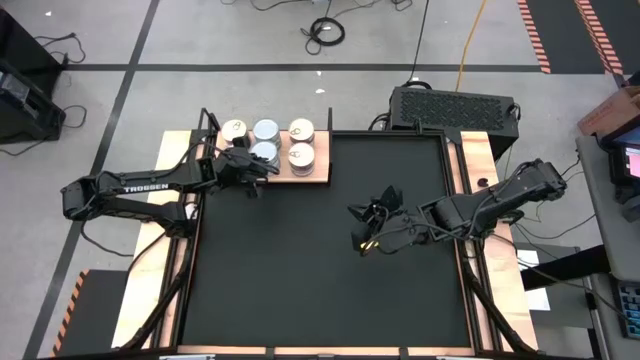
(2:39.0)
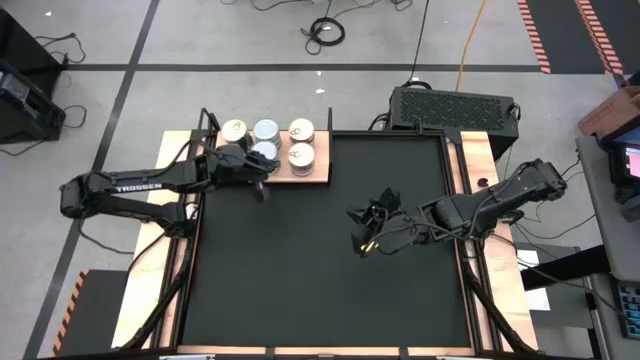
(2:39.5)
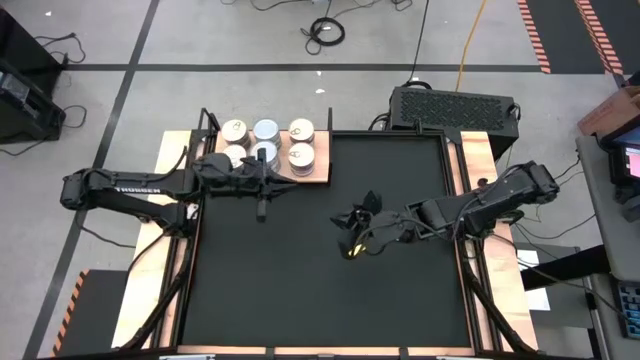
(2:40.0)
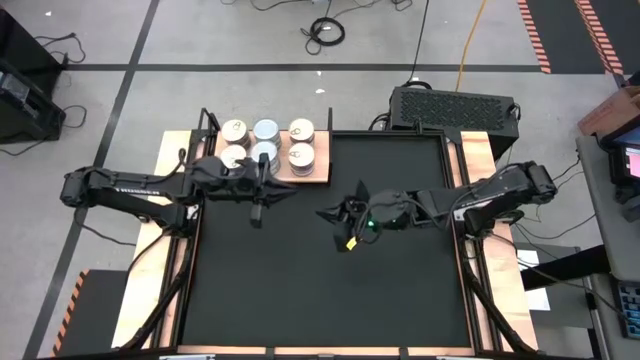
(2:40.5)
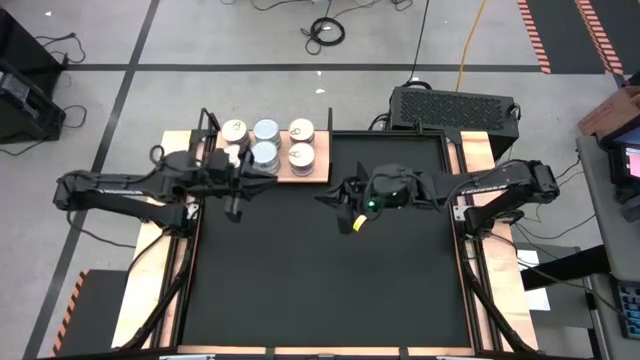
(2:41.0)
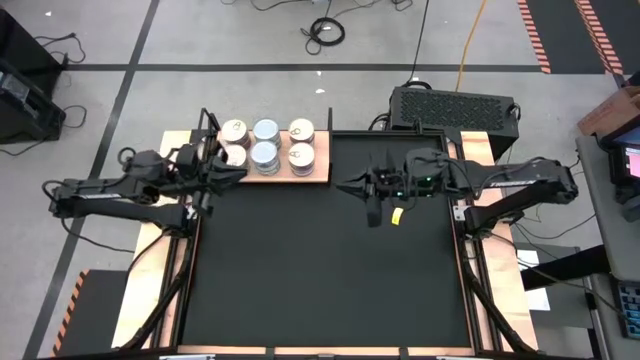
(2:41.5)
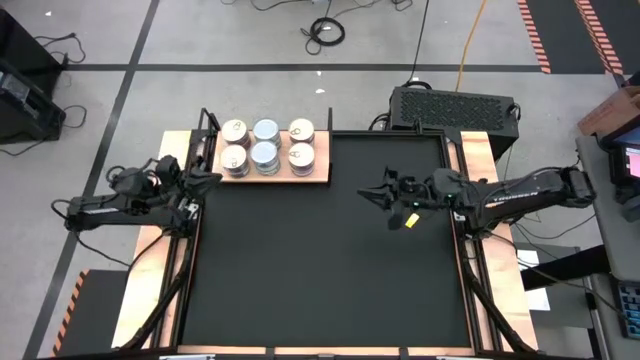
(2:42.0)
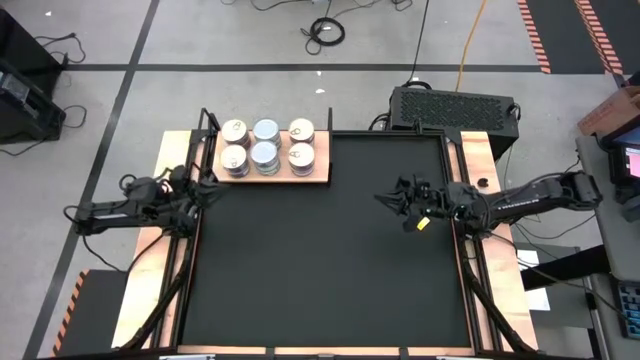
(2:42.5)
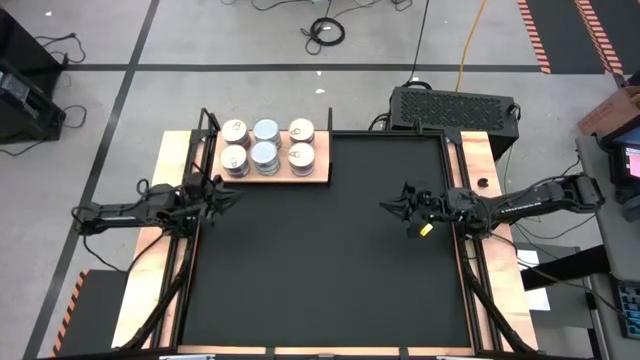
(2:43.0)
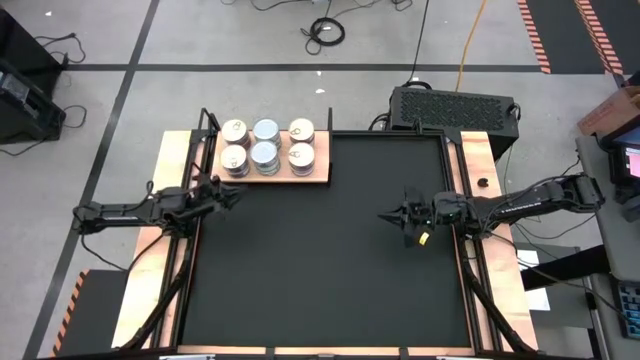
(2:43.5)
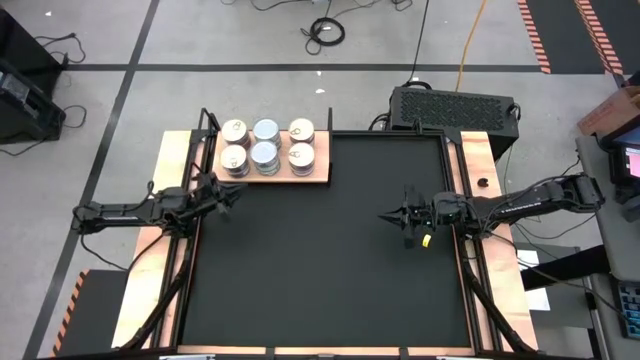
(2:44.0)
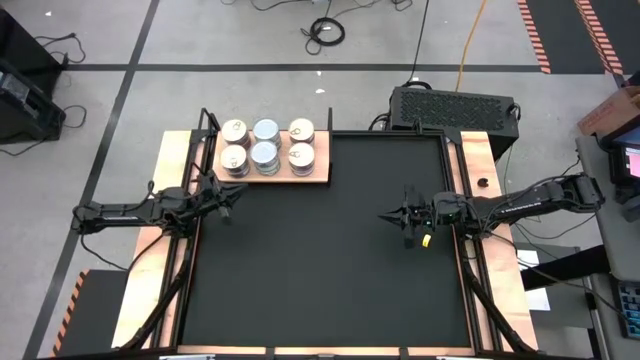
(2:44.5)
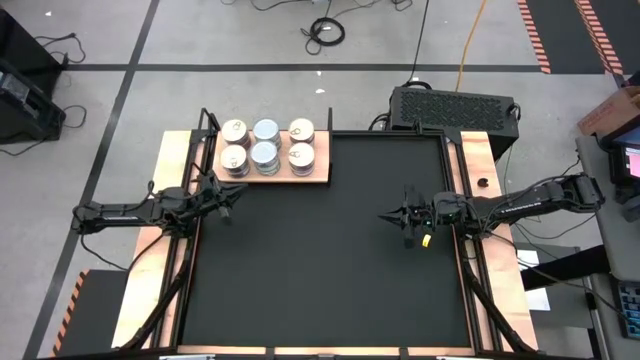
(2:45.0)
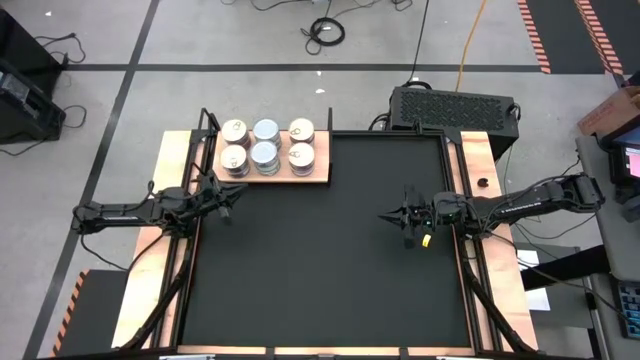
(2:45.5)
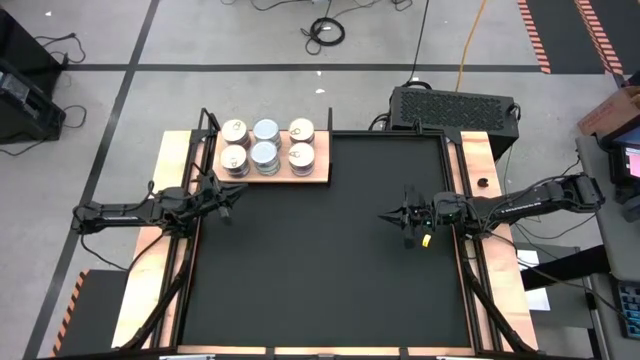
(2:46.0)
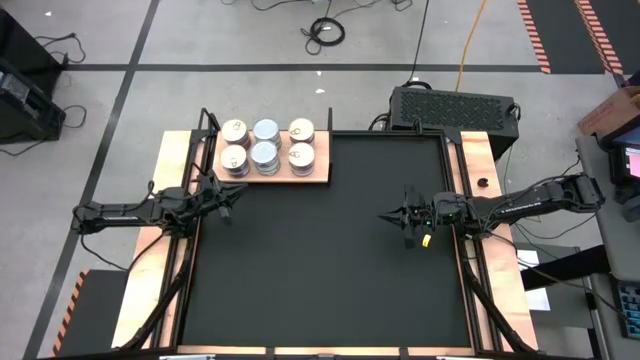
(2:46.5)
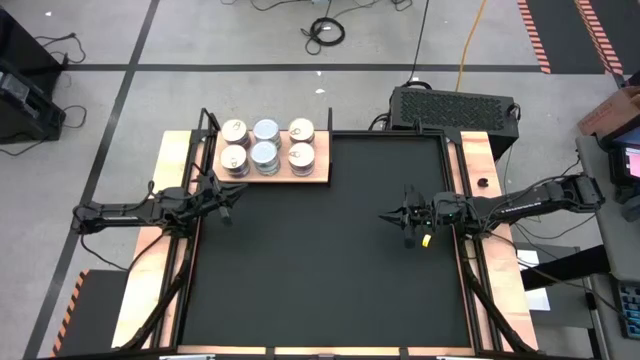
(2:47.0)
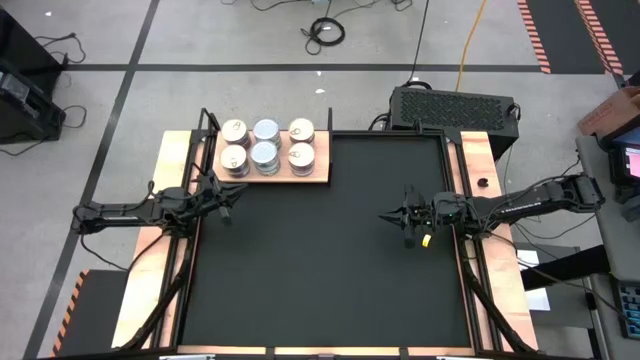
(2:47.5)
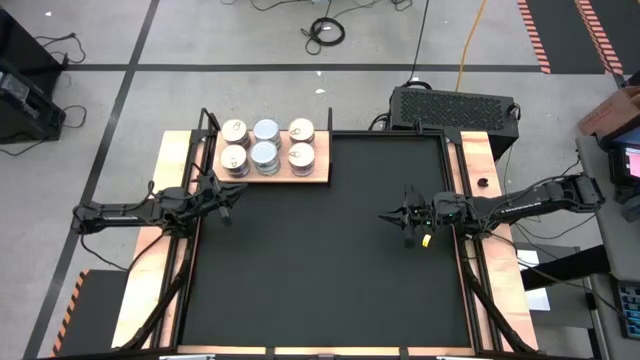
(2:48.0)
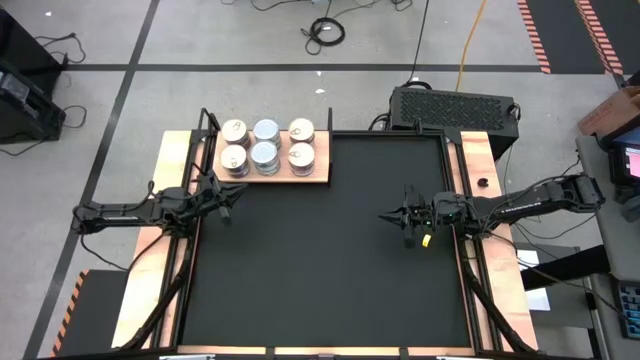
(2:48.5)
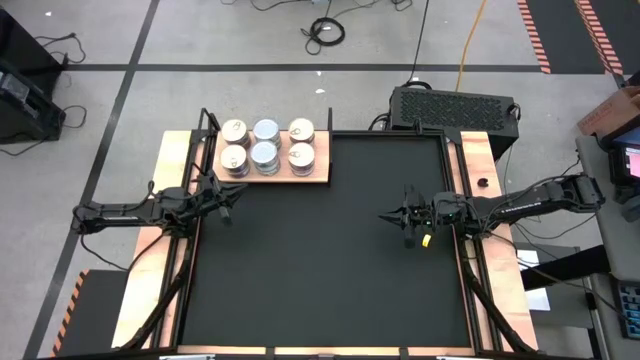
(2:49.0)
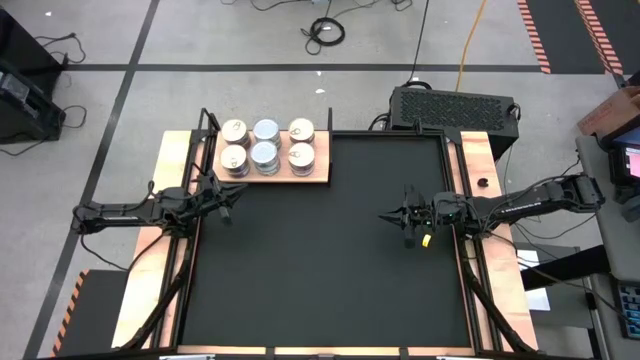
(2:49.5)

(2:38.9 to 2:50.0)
Task: Stack canned seafood by type on shelf
Return to Home Position

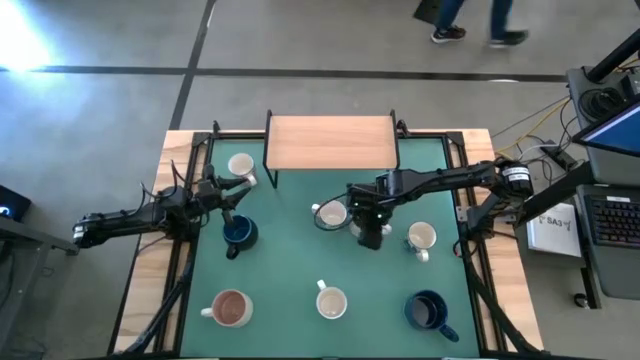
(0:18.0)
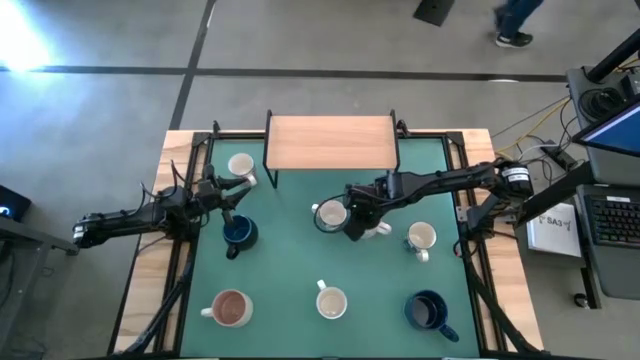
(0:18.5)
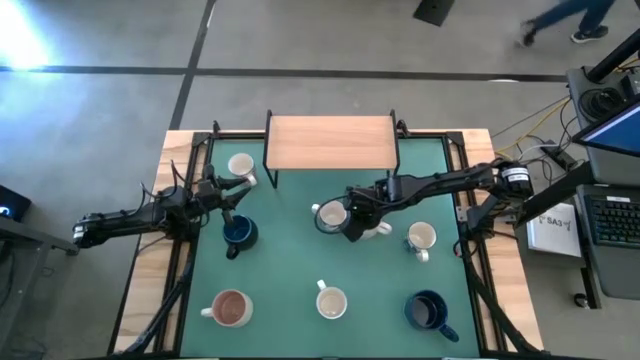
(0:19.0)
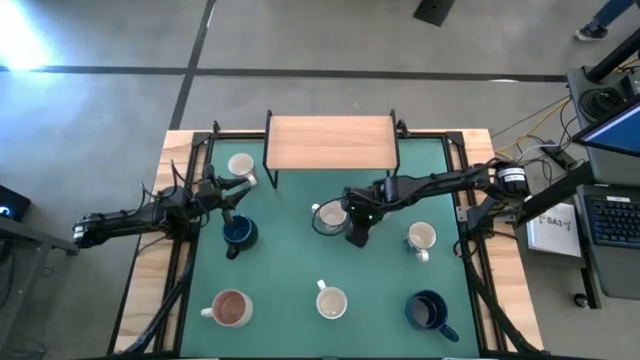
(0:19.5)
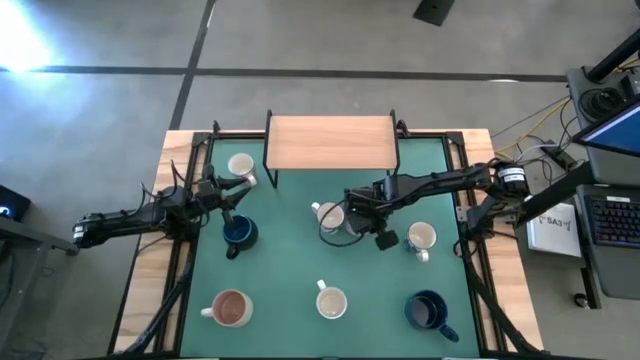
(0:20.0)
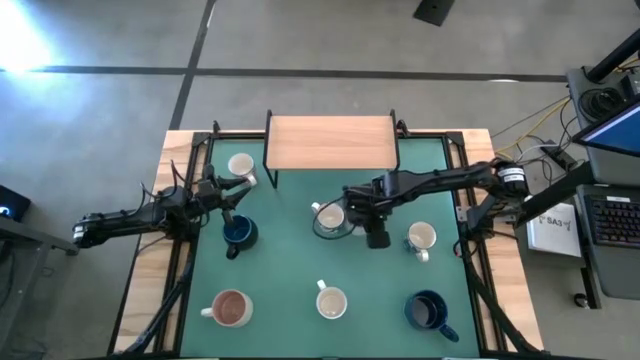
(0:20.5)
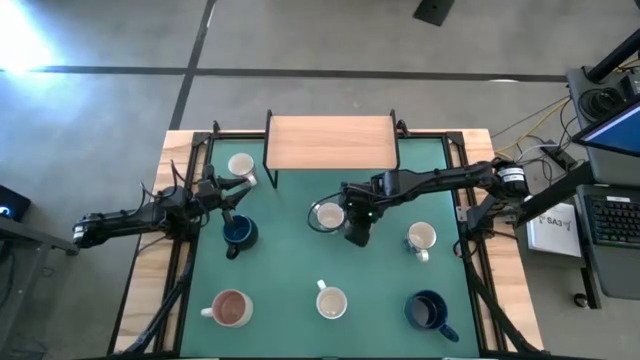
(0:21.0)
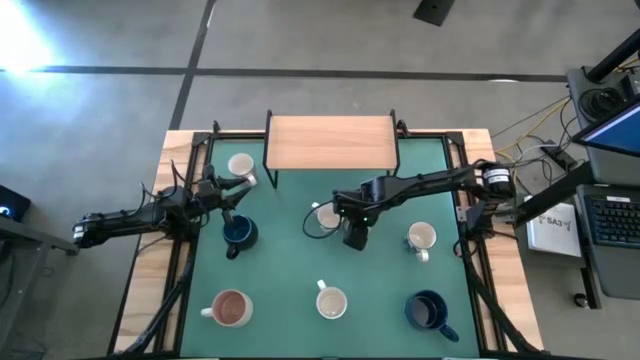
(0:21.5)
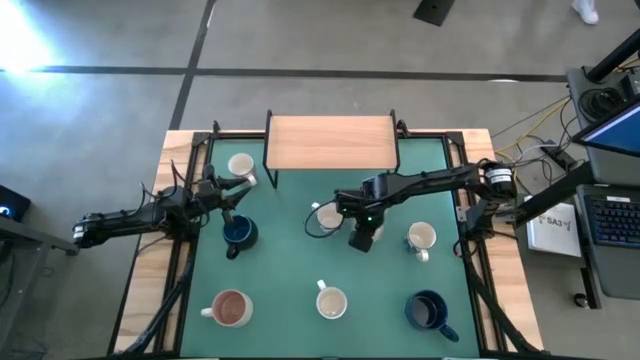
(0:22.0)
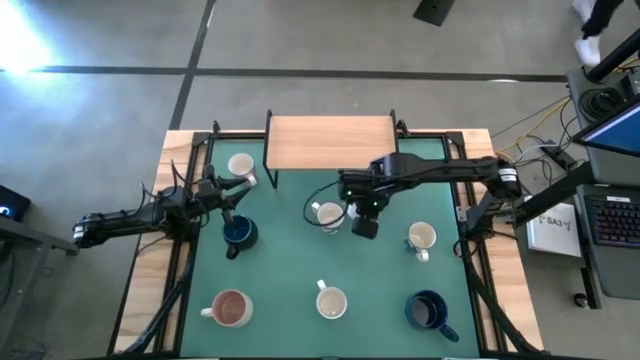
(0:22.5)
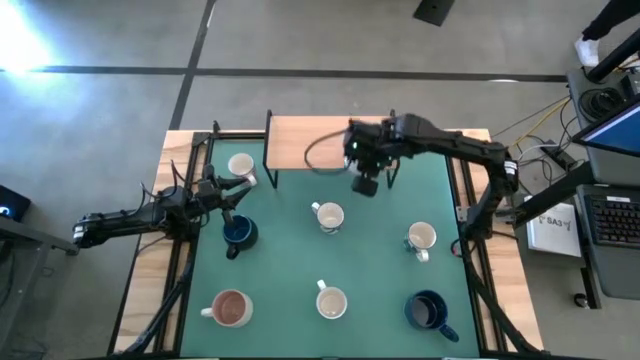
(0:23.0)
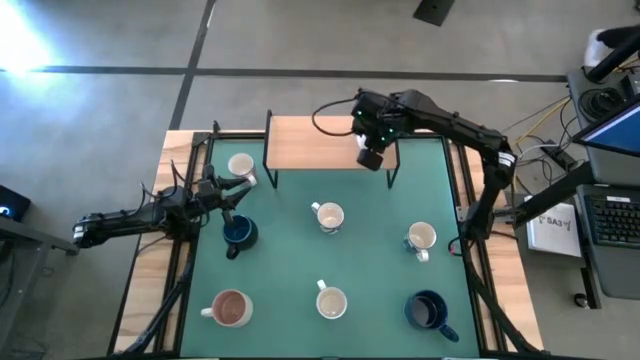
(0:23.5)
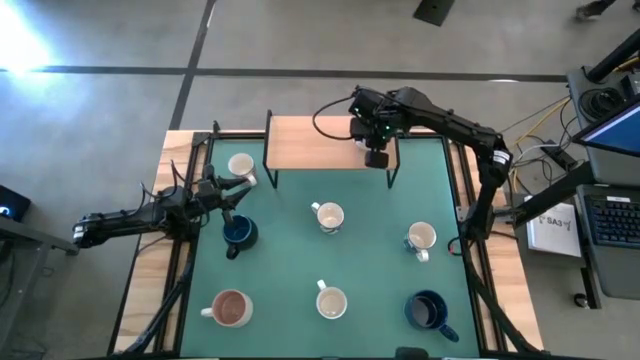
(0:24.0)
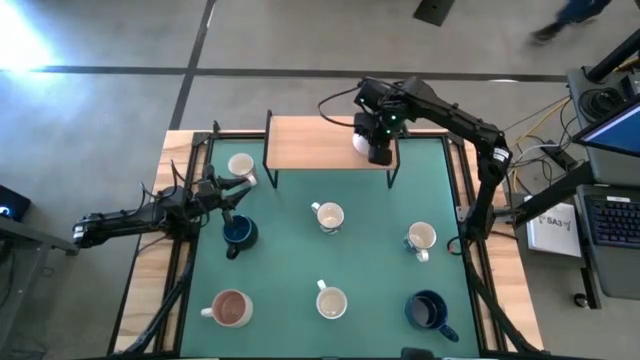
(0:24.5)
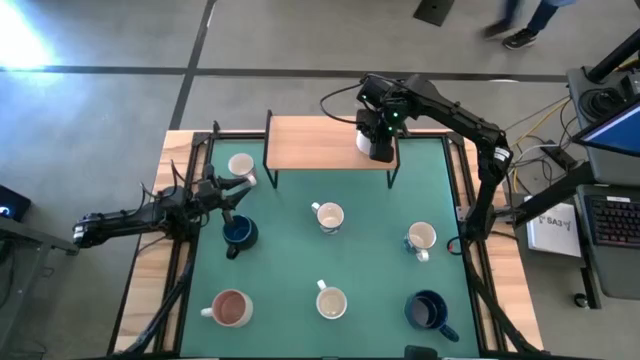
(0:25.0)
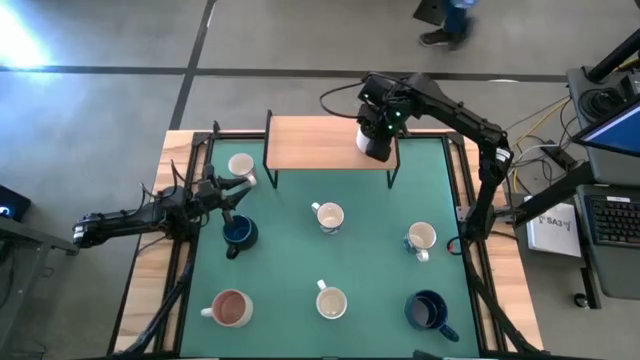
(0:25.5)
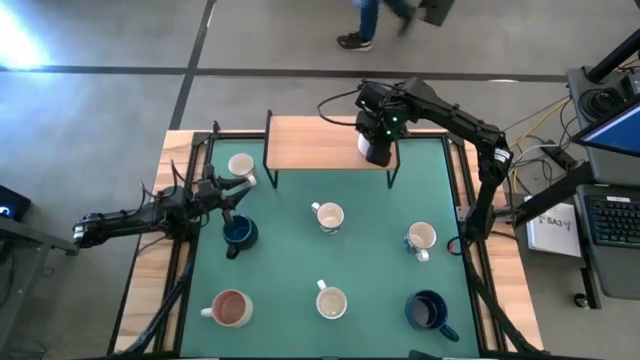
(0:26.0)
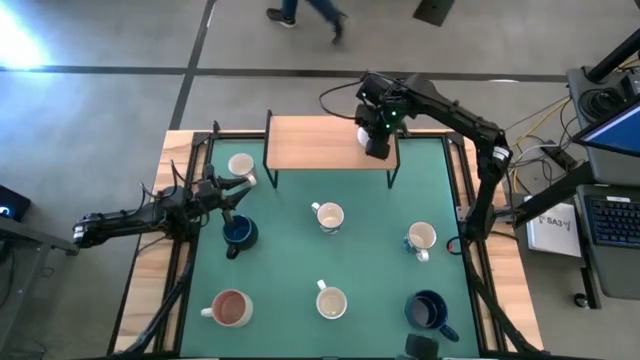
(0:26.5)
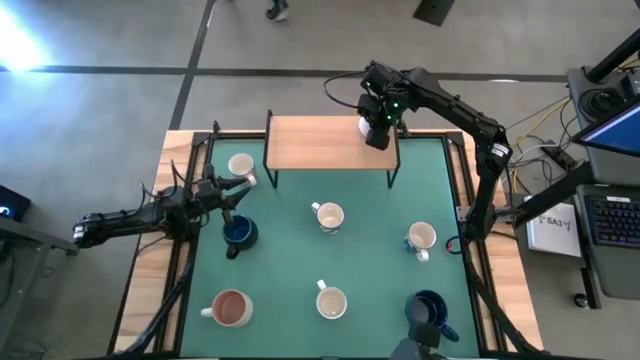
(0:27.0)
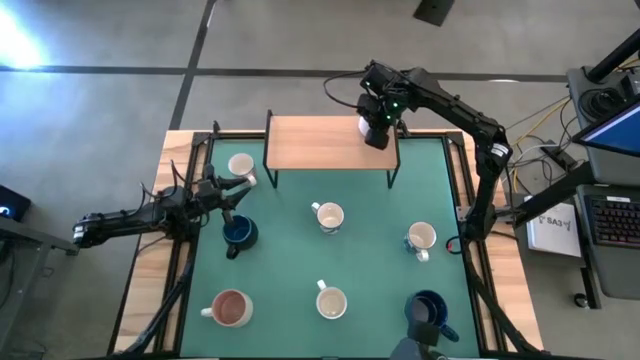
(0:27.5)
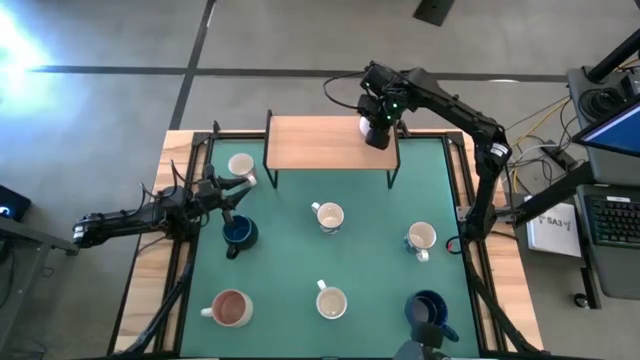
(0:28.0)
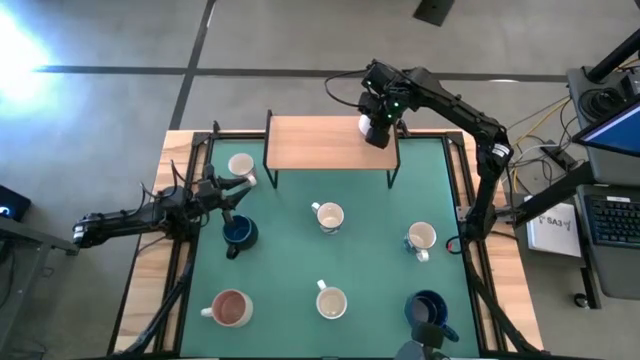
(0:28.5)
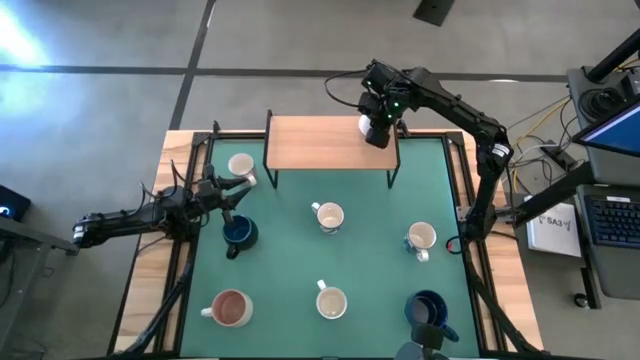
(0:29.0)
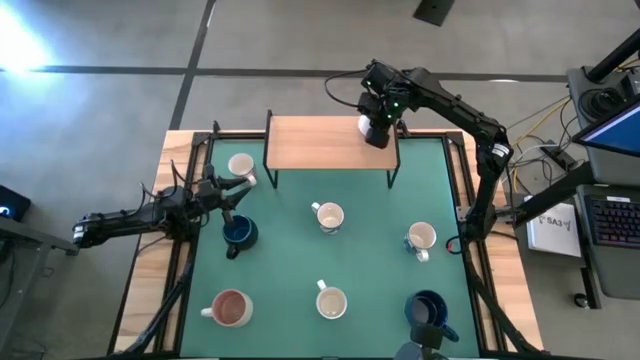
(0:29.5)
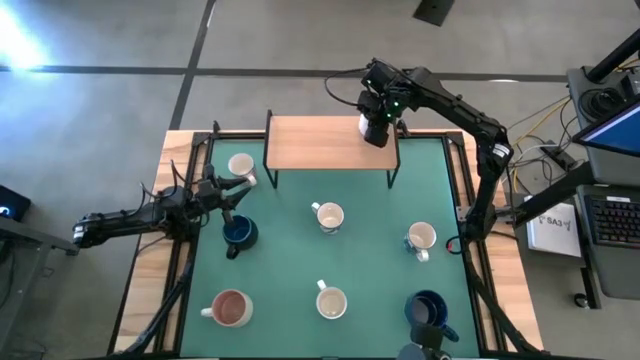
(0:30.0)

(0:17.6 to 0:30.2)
Task: Place coffee mugs
Put the white mug on the shelf
